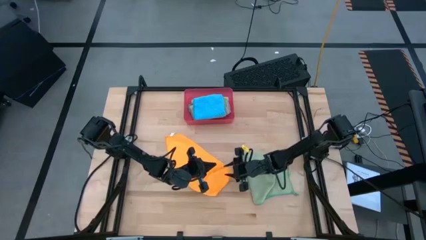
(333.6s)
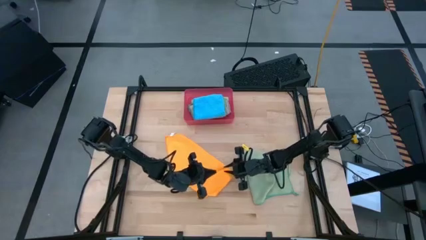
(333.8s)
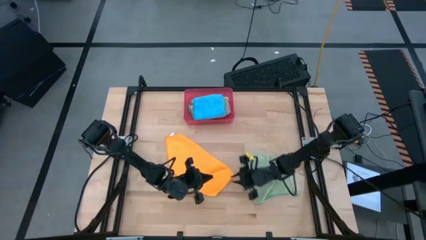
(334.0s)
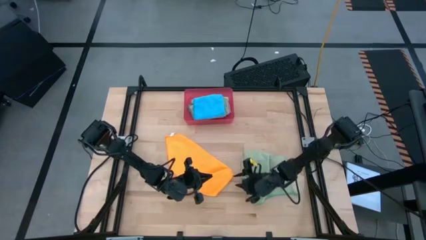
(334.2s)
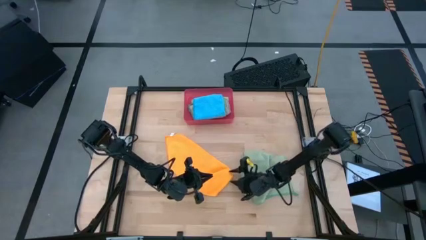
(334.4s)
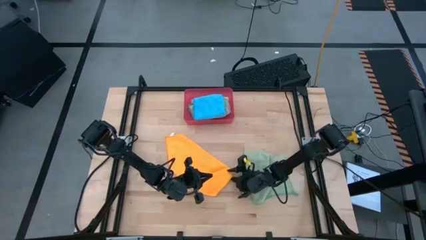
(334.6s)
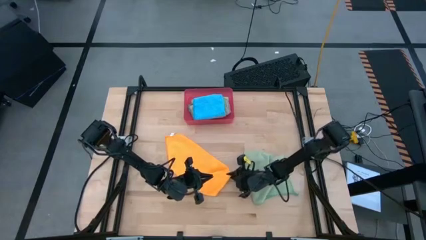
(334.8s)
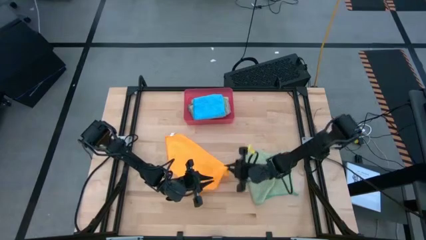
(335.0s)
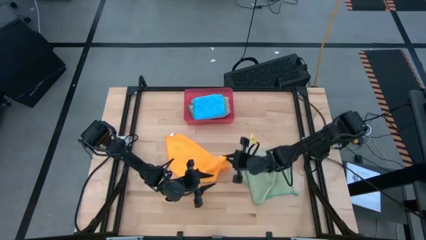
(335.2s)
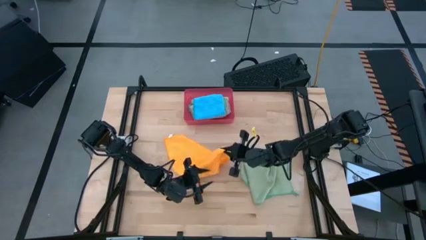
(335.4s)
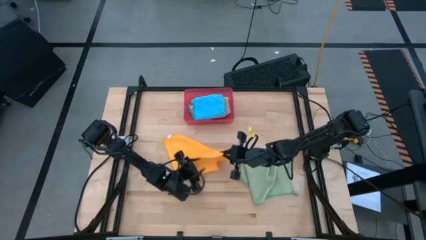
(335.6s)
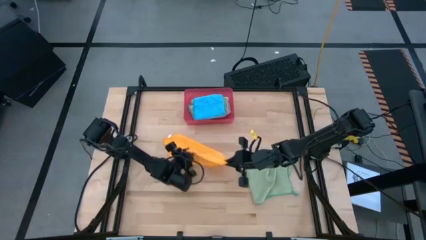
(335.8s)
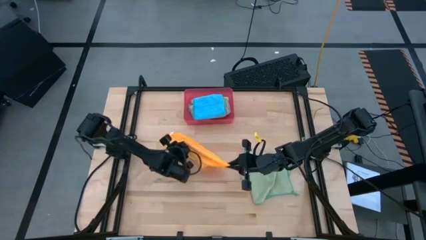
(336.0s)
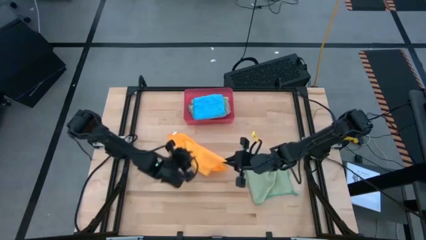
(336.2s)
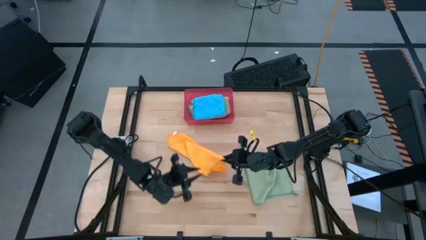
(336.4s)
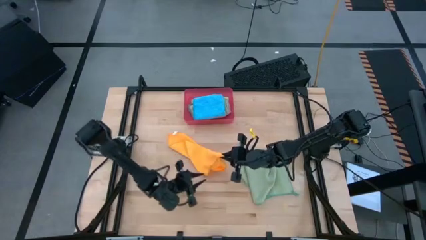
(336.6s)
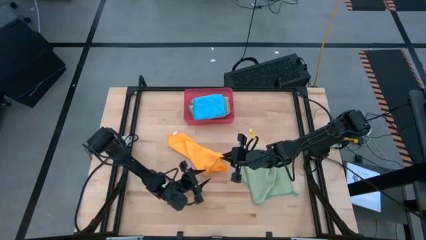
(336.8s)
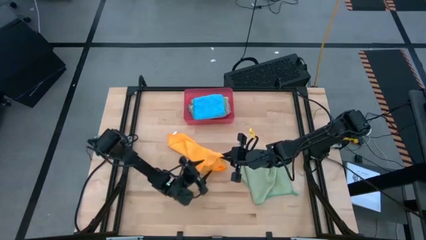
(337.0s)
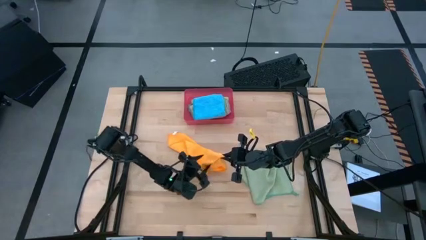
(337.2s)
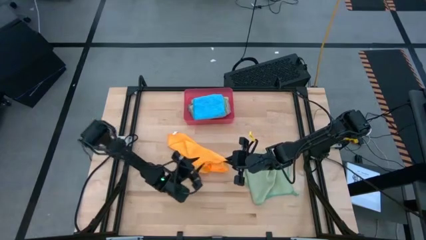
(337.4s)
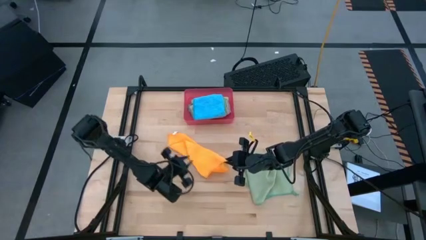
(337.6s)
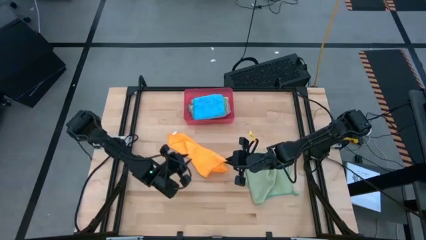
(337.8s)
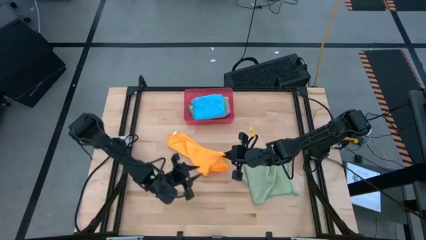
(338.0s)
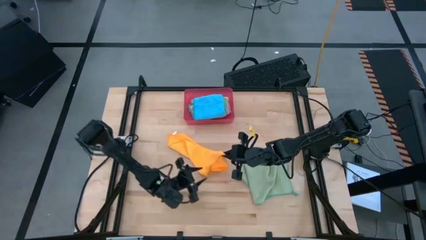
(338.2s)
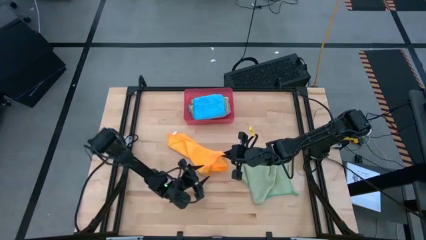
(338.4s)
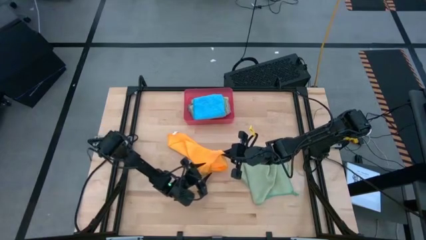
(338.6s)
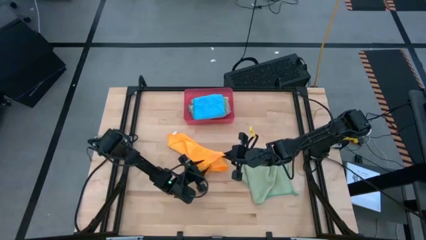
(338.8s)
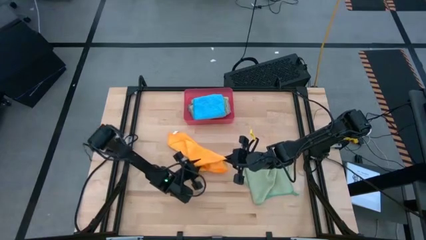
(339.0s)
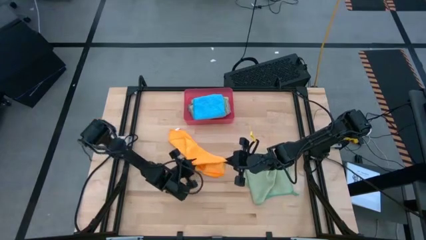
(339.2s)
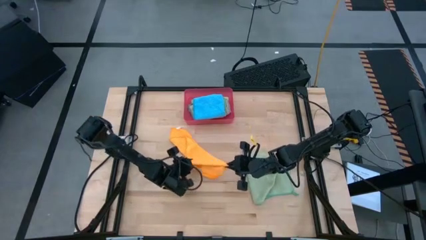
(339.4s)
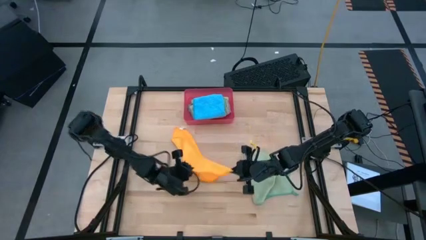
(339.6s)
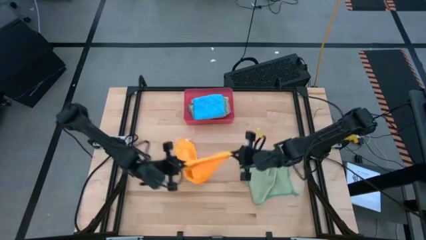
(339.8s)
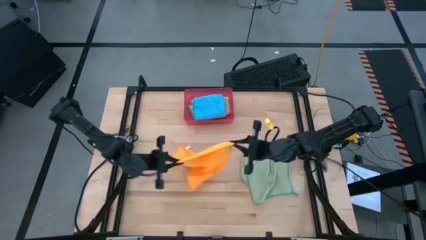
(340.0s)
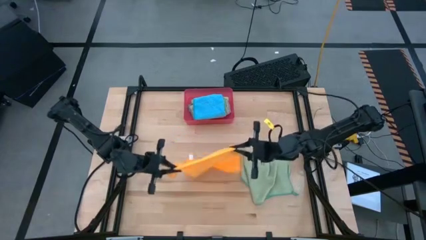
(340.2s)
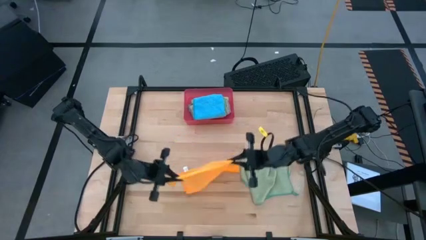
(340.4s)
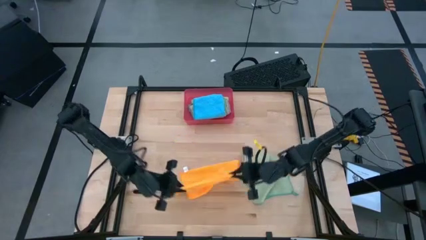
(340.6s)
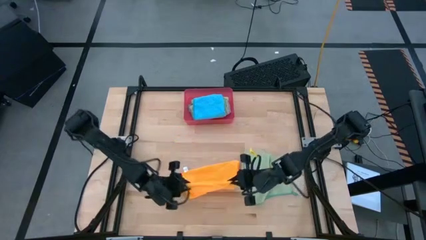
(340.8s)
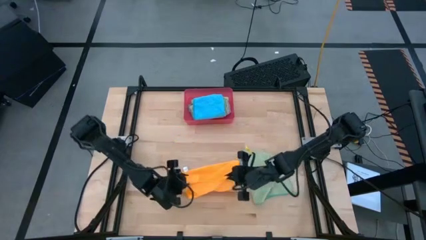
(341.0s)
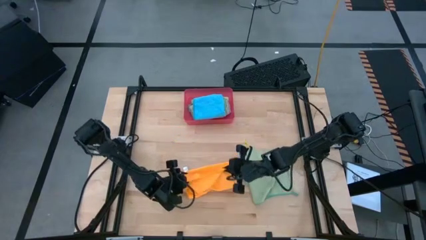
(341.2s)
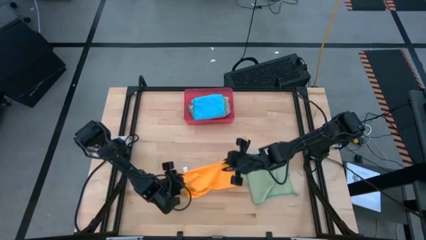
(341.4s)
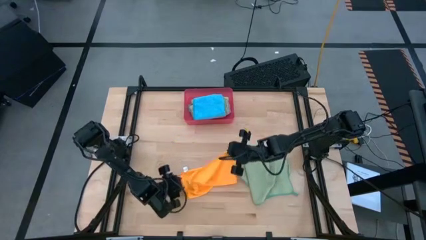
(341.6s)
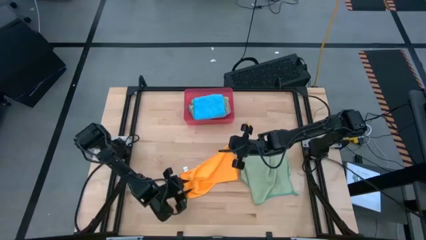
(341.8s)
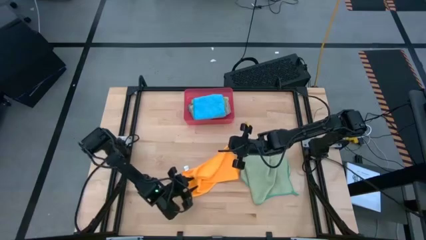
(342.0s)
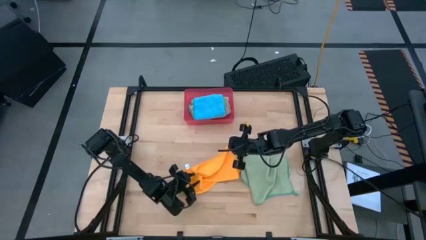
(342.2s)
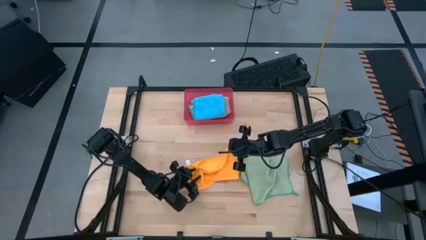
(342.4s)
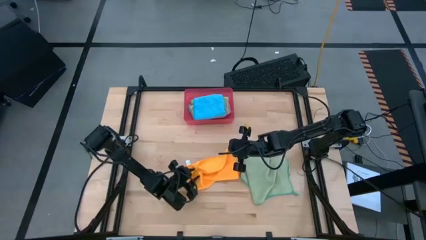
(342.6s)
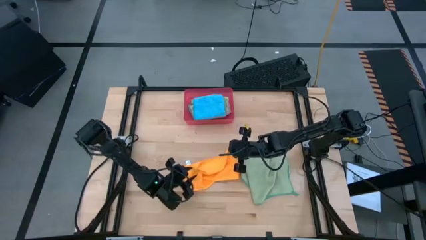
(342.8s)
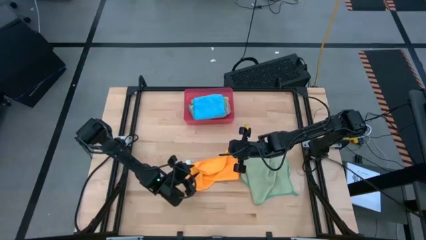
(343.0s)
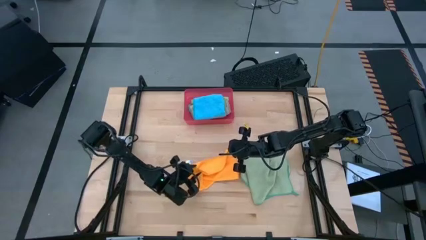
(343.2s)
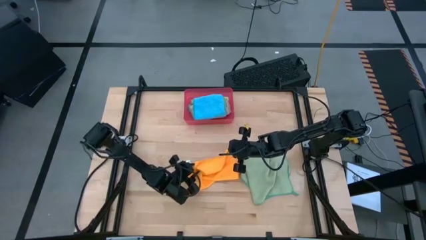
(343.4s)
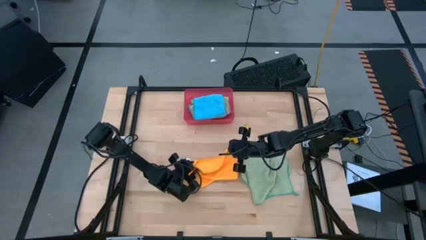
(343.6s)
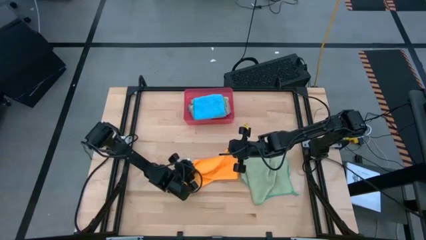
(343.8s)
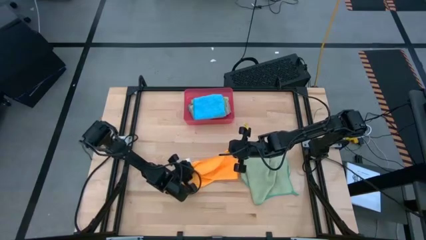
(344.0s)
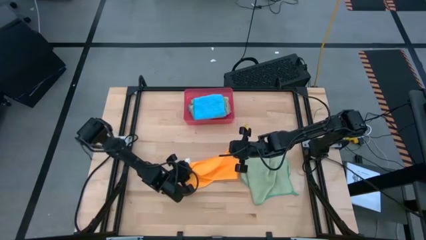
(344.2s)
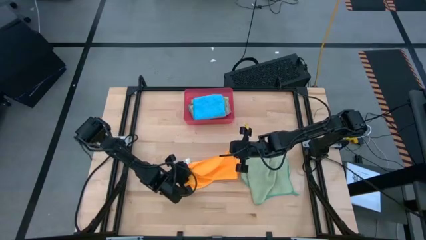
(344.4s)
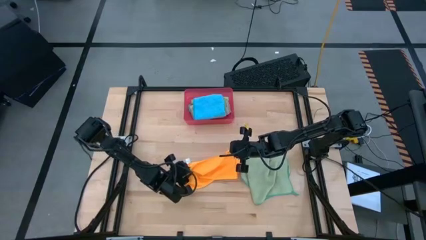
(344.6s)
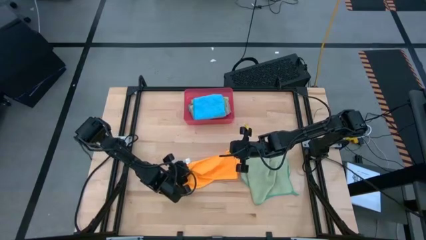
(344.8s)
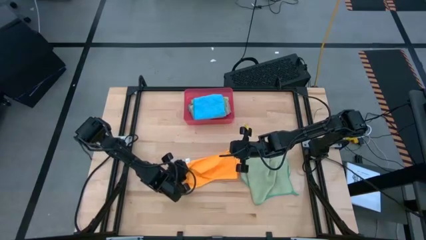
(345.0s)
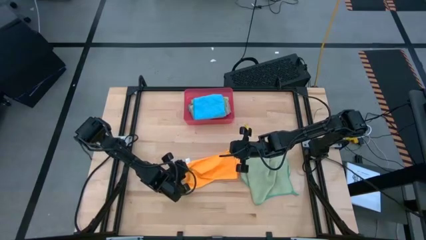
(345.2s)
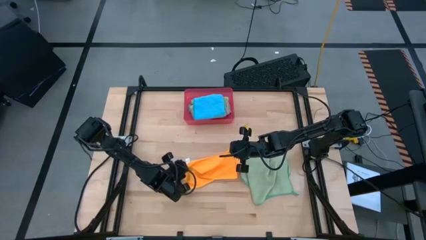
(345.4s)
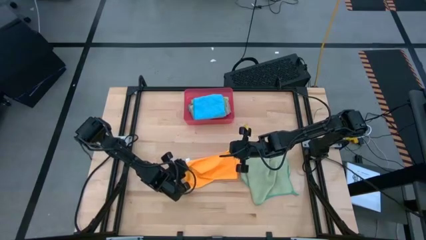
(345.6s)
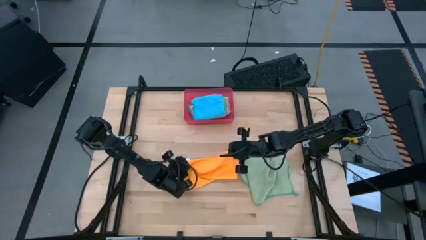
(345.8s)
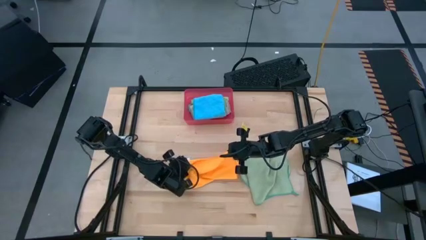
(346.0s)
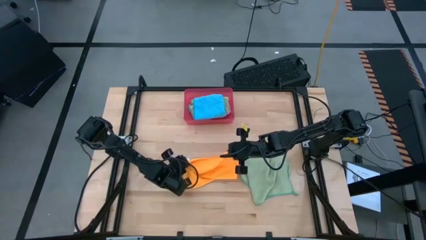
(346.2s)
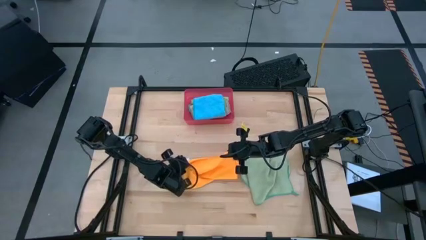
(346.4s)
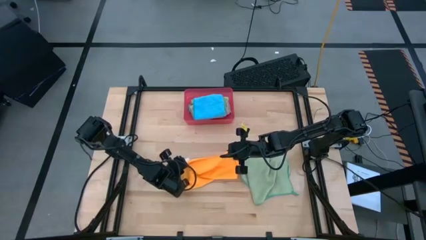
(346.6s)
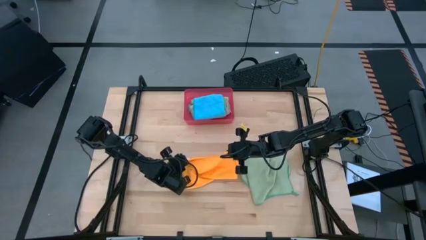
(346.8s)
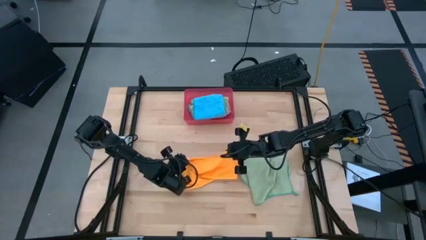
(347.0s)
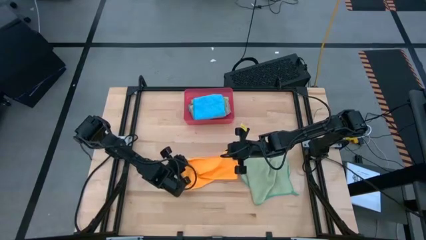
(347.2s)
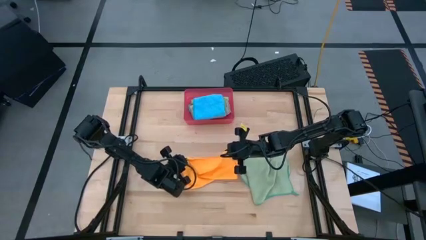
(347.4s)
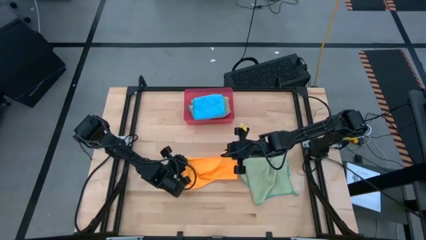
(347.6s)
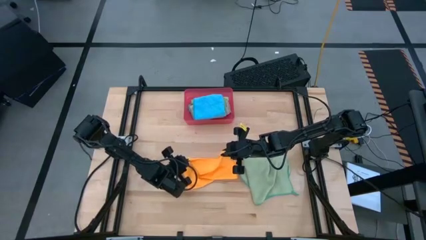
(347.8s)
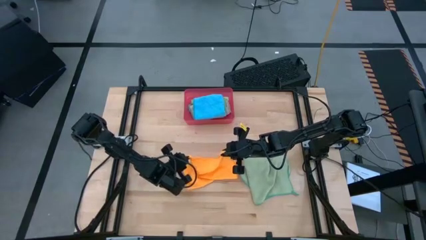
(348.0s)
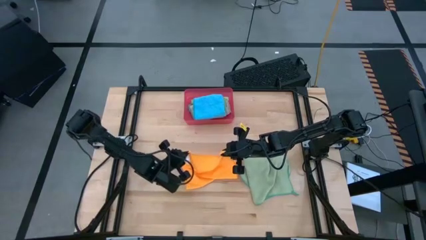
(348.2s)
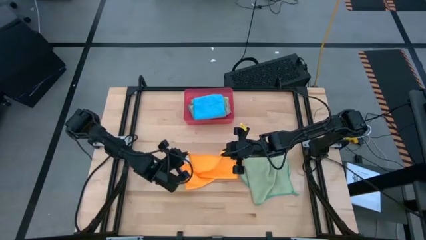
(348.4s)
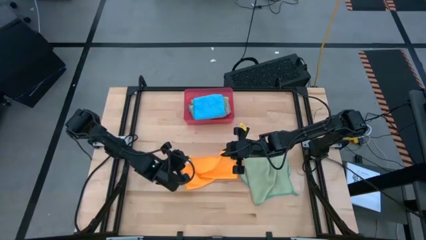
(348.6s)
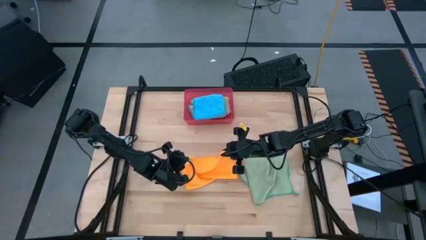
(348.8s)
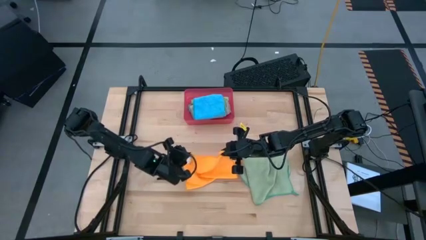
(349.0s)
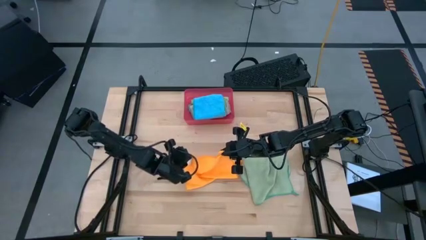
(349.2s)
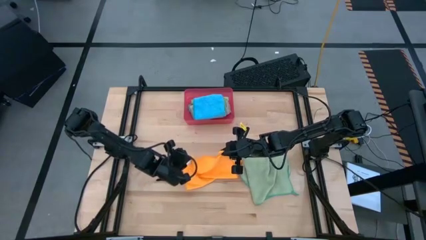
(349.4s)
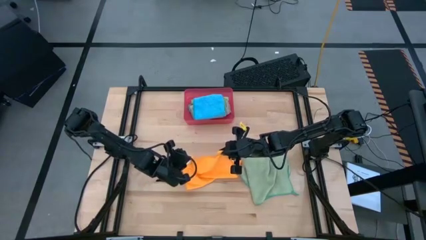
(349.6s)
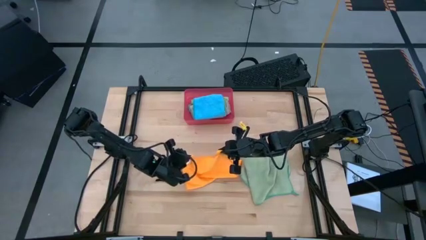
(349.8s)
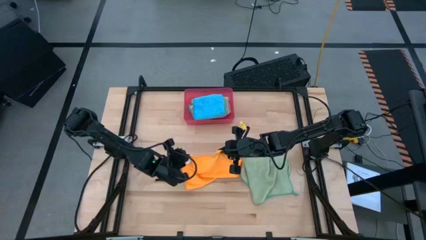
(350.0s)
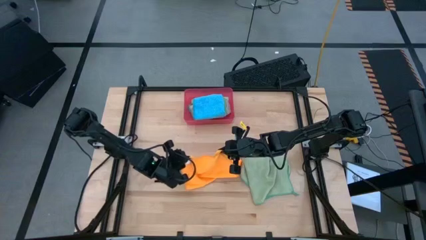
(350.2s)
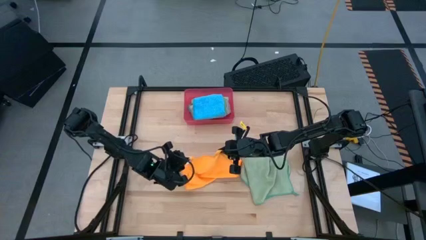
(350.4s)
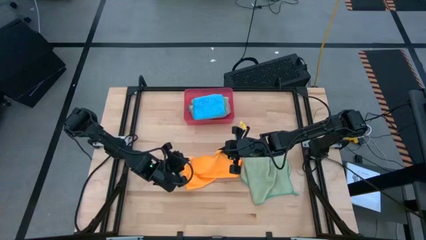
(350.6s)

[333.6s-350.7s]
Task: Fold microfiber towels
Fold the yellow towel
